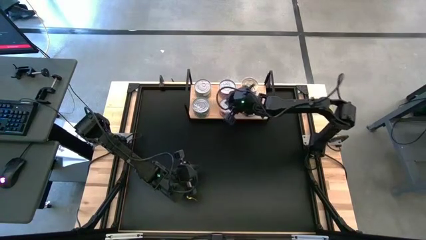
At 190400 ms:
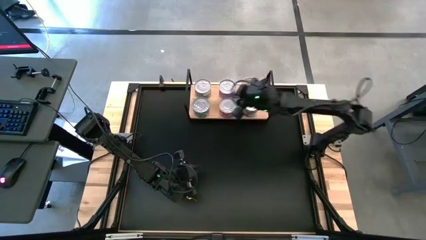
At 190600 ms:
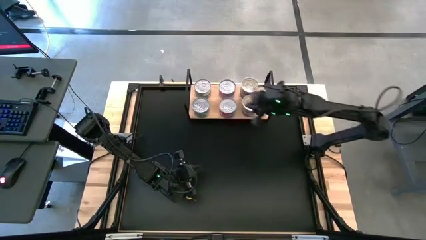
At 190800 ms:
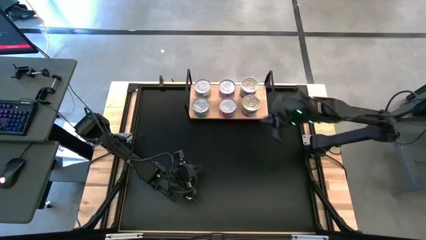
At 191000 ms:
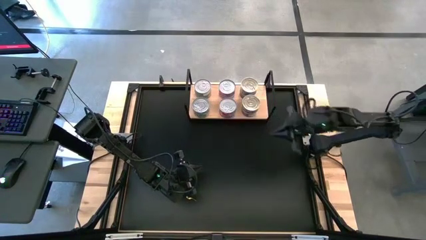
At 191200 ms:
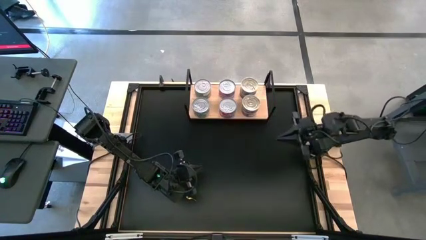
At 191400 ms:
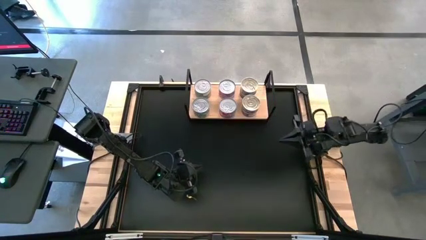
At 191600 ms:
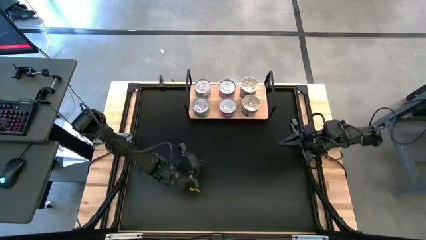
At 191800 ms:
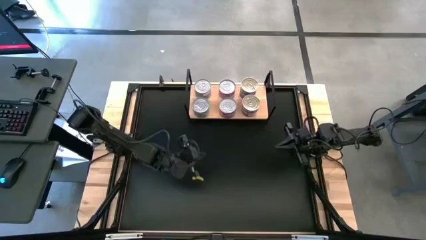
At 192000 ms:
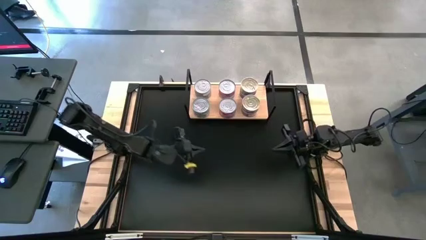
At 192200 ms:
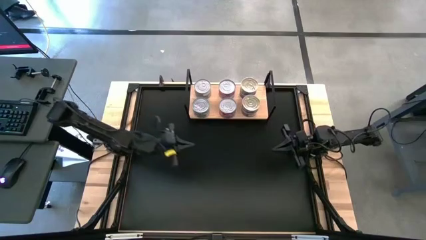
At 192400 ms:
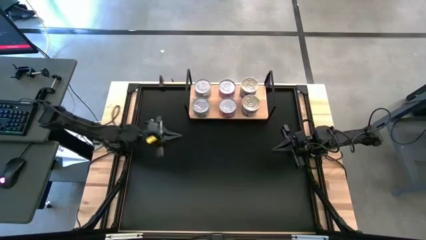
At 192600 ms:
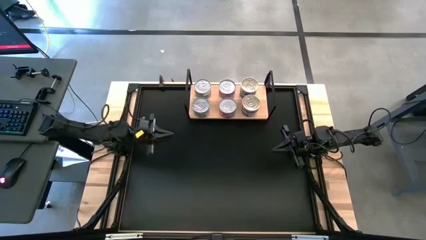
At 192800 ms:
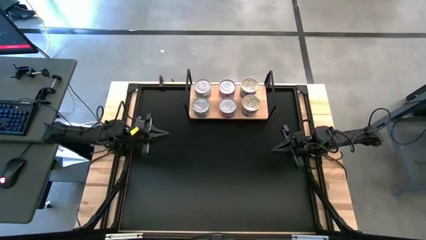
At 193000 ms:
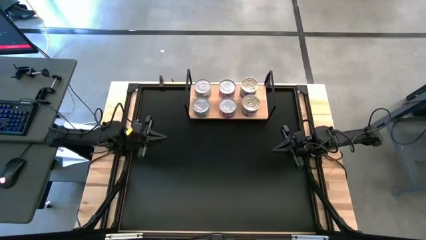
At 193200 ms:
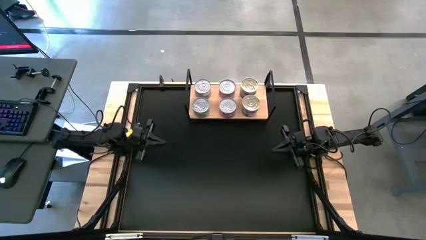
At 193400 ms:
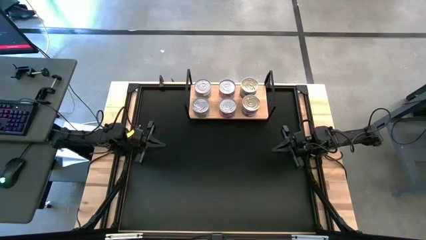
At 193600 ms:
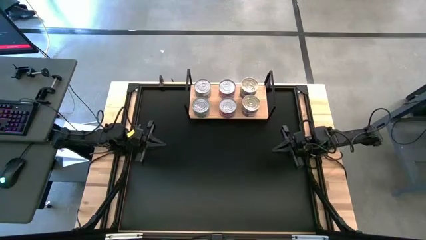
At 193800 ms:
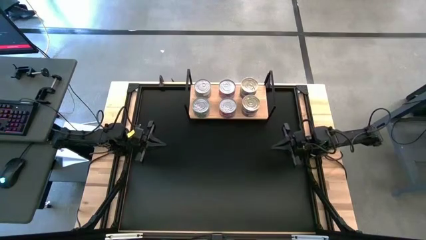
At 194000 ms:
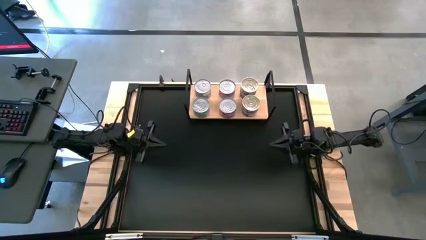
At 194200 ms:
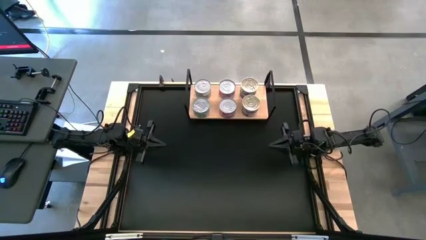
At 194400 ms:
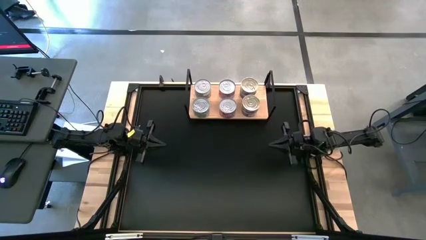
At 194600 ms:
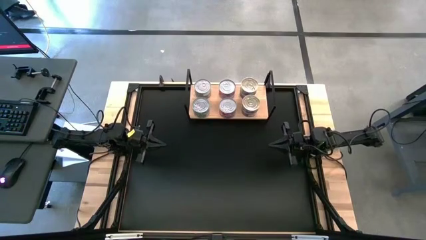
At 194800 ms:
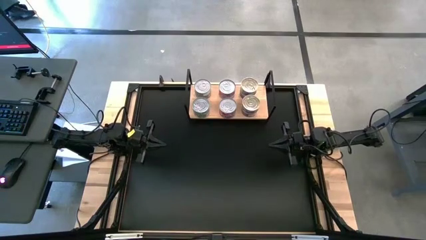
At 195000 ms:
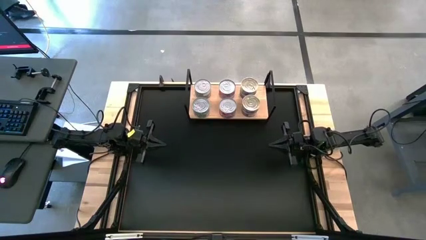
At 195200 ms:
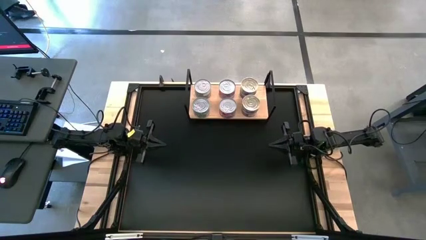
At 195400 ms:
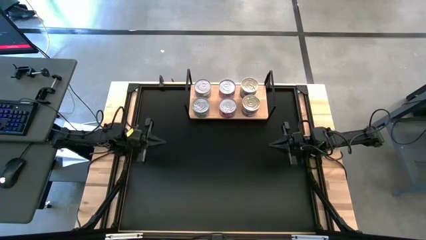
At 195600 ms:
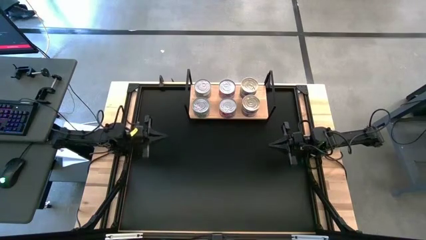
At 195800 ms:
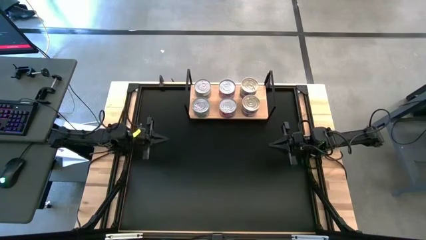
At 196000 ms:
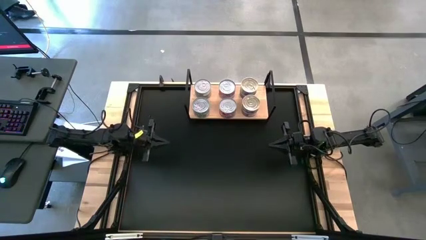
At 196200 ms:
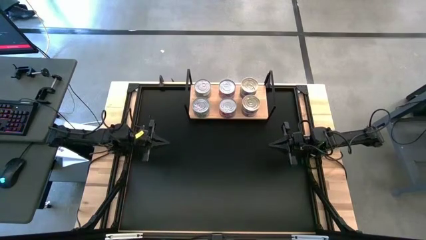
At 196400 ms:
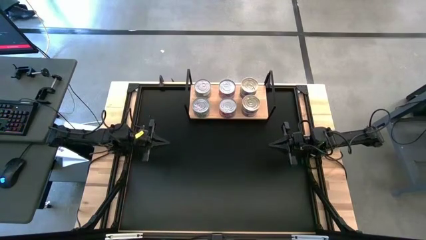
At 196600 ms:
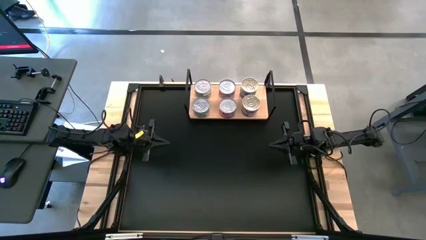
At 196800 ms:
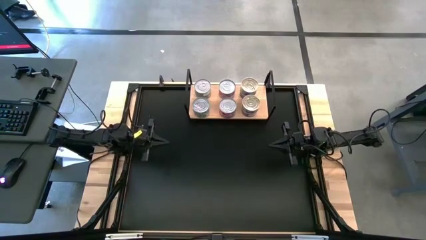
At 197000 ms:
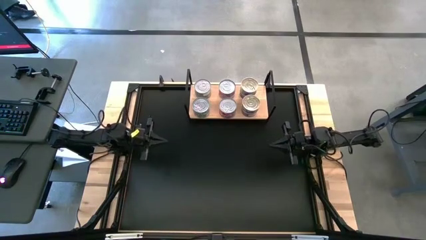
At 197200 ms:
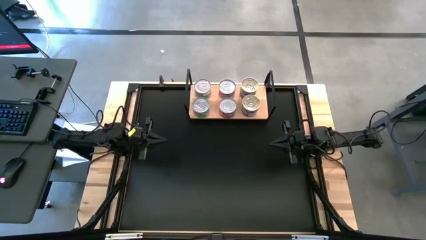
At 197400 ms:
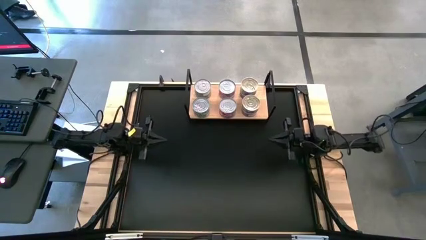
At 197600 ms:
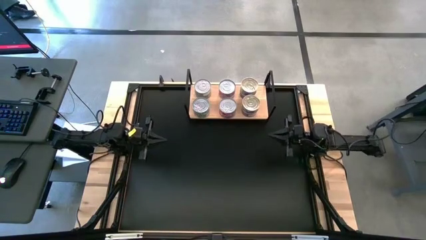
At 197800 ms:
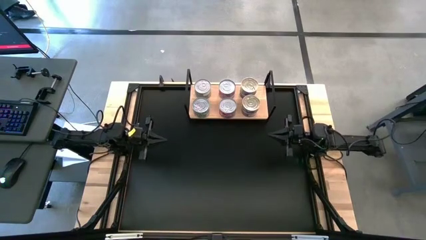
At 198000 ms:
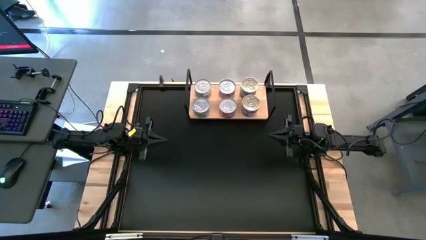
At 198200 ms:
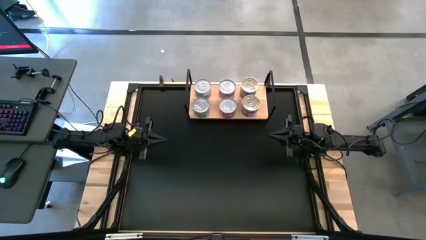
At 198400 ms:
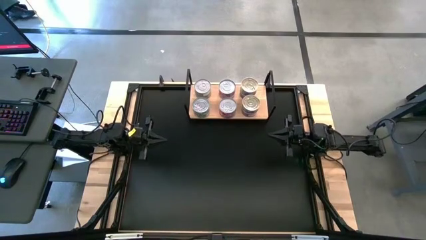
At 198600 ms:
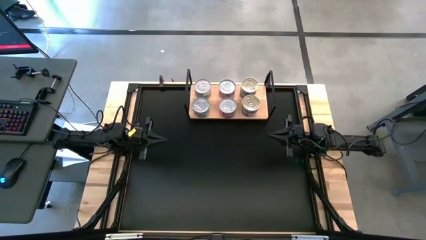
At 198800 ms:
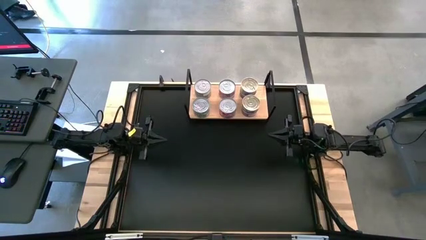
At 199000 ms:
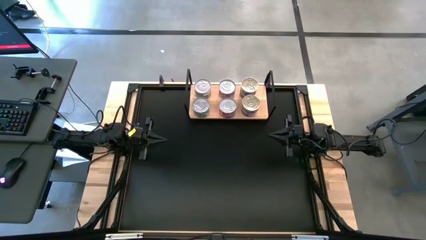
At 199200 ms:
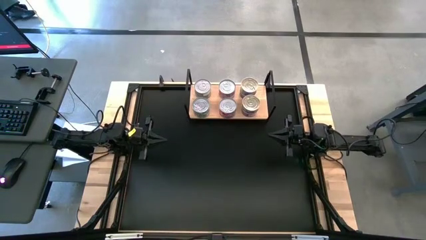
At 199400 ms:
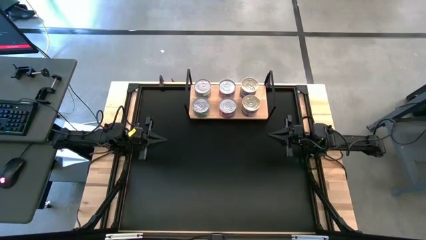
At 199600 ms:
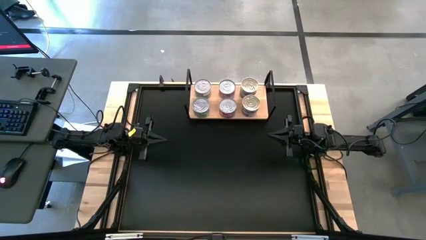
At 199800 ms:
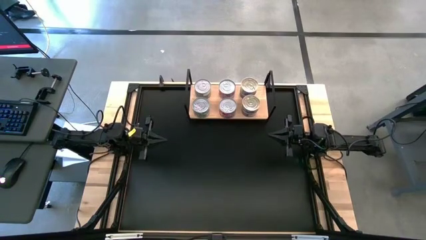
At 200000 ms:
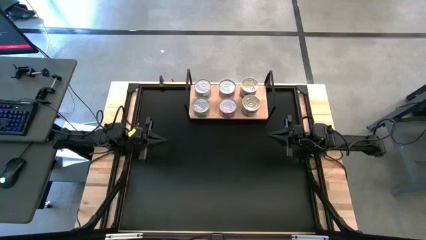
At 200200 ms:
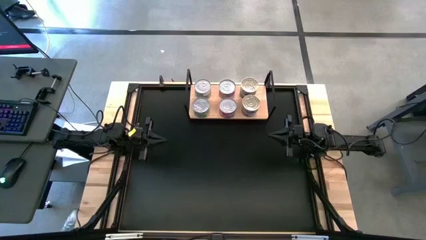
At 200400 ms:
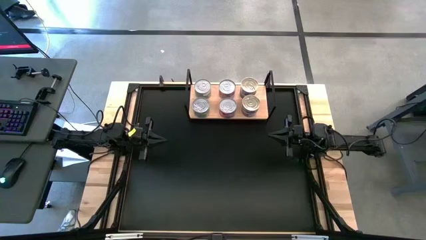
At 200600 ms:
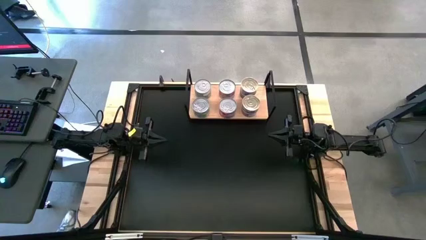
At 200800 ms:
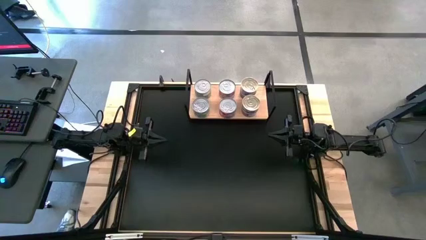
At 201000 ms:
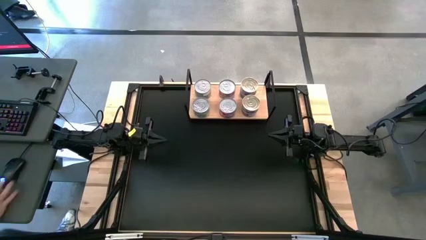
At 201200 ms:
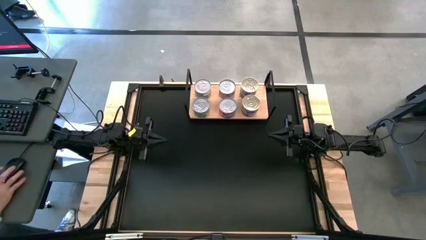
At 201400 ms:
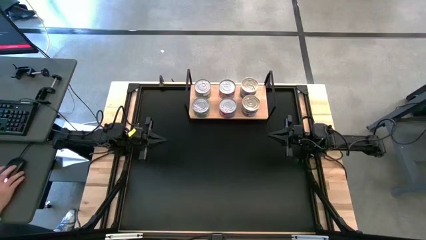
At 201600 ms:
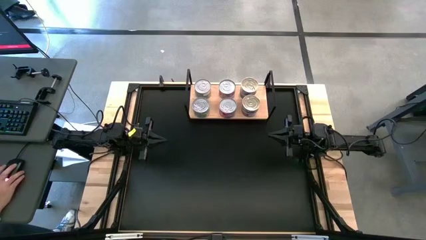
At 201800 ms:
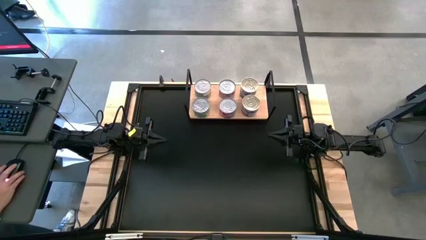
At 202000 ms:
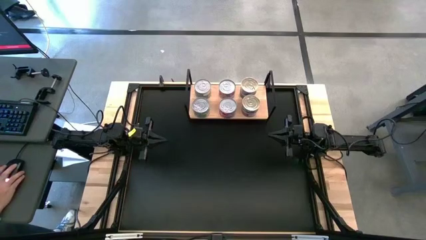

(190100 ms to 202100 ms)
Task: Stack canned seafood by type on shelf
Return to Home Position
